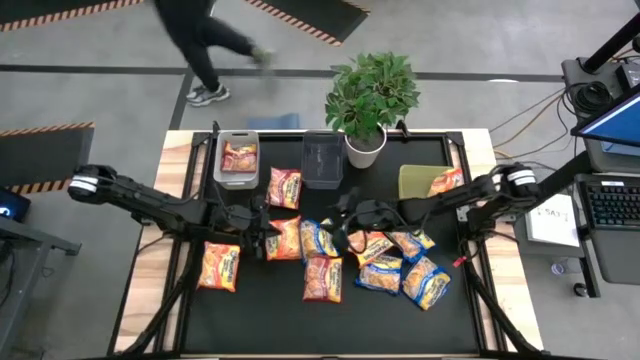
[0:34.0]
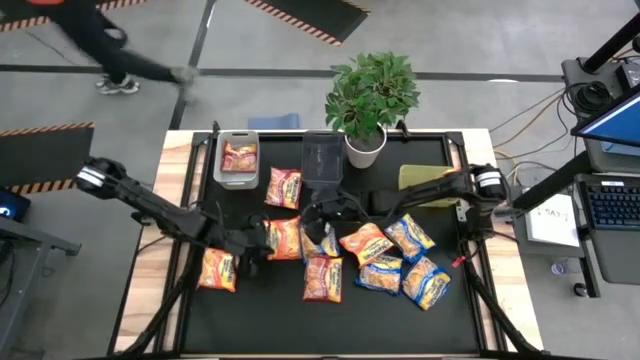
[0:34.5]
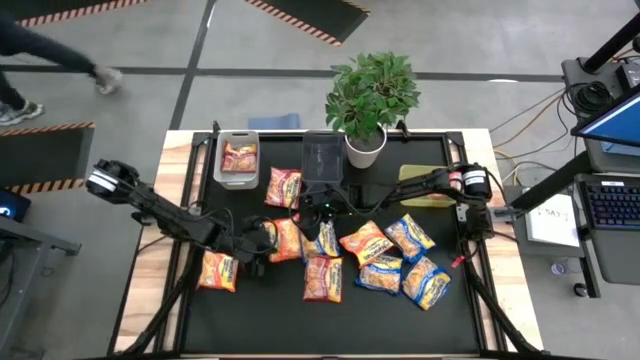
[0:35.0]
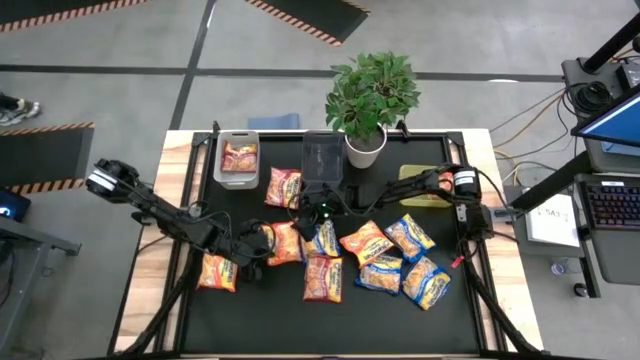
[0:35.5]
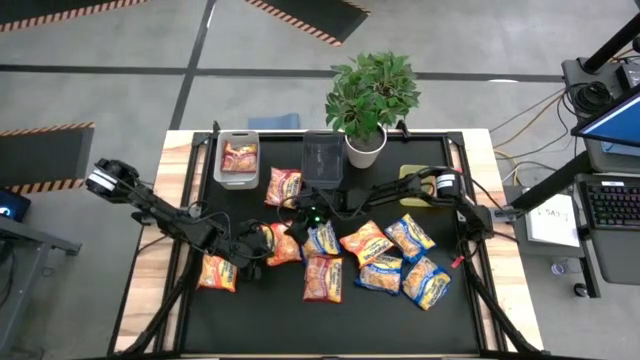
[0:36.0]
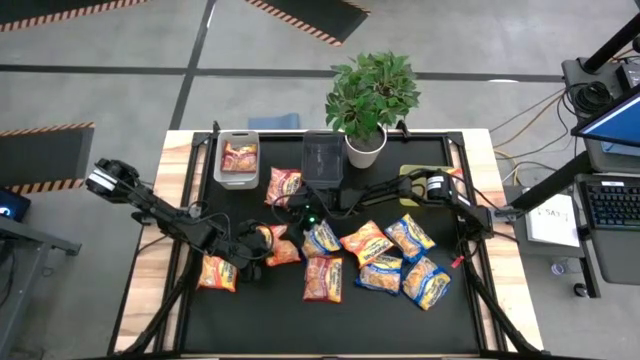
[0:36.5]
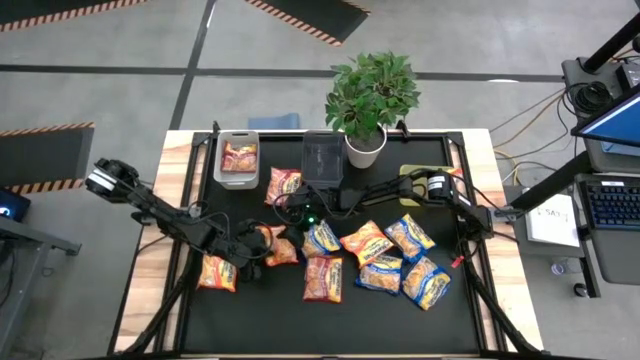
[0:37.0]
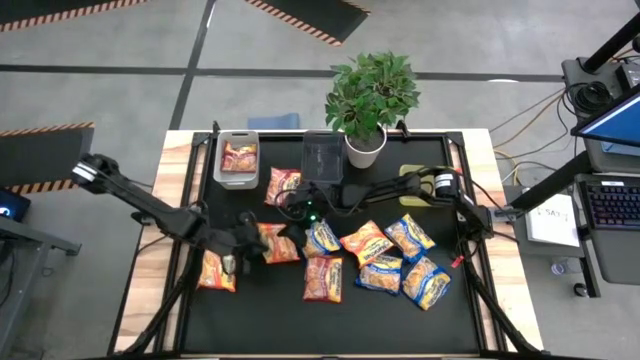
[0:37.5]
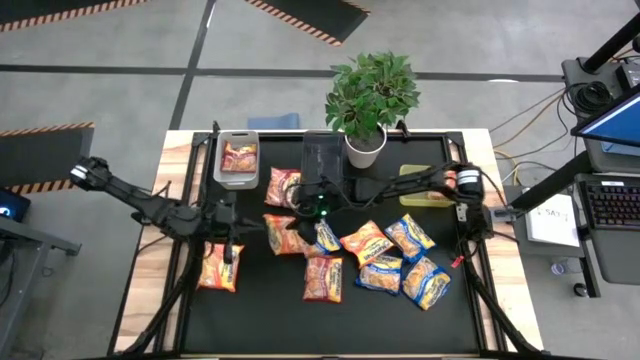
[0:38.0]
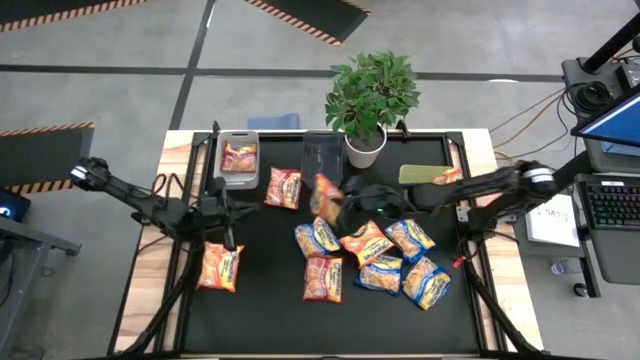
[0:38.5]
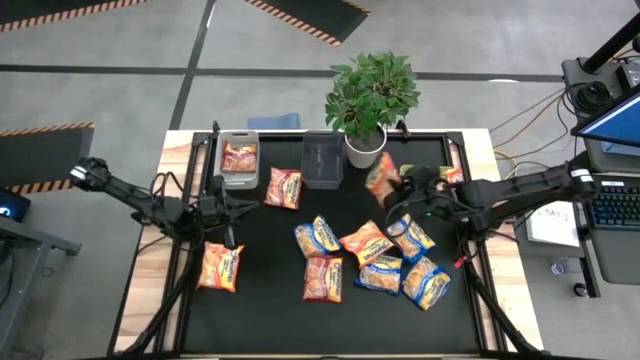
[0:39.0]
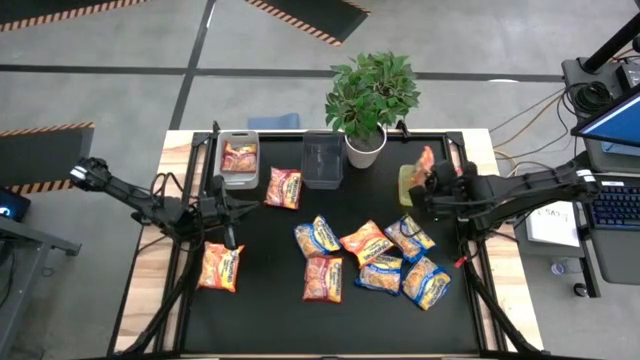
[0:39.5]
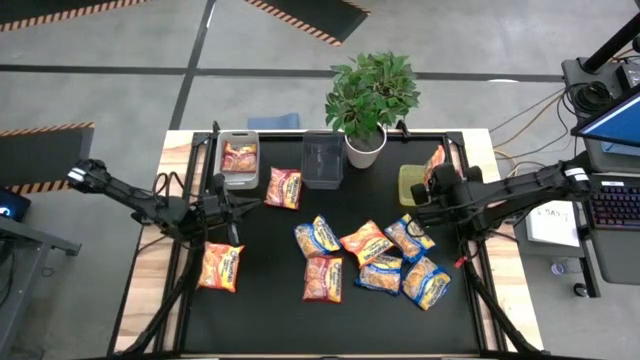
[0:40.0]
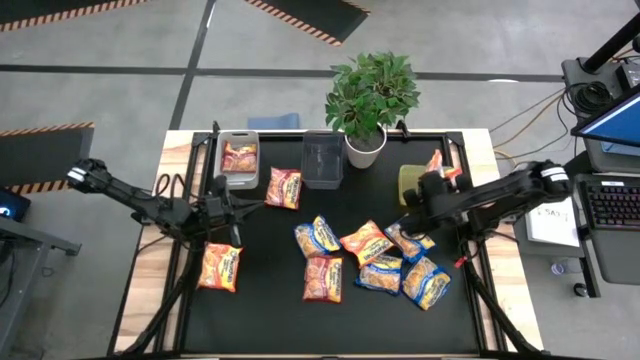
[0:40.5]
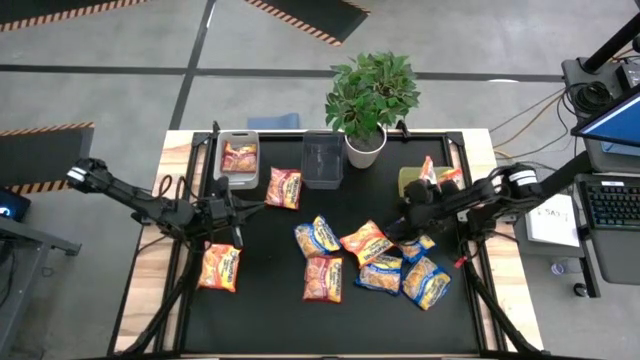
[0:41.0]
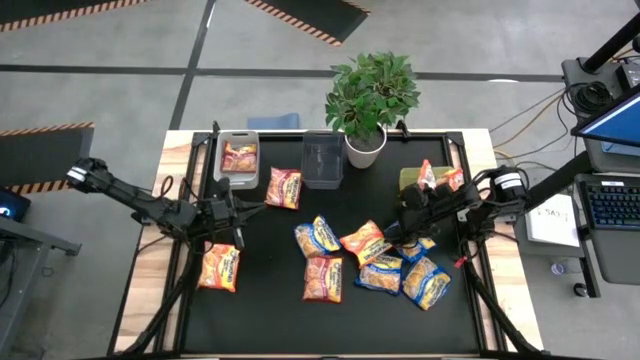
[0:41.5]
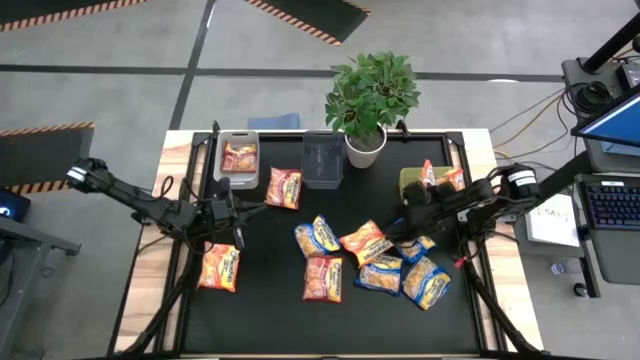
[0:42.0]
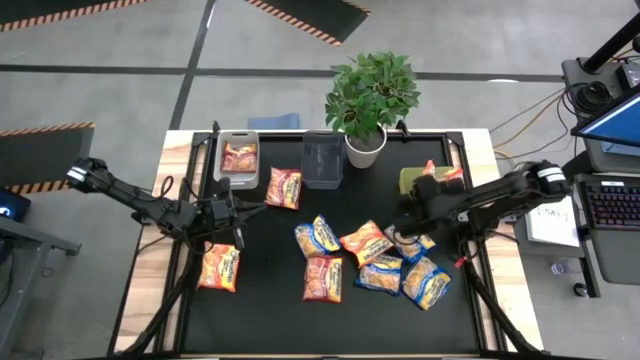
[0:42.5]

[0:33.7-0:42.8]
Task: Sort Maruchan noodles
Put the orange noodle pack into the yellow bin

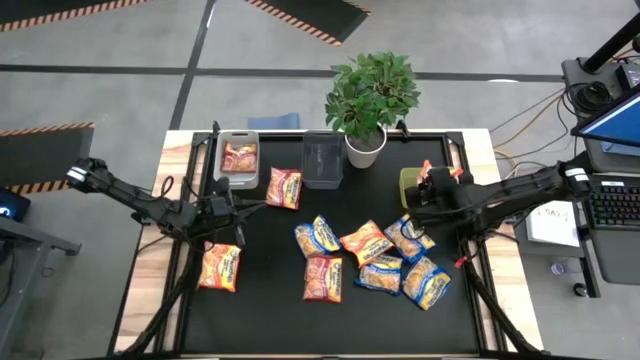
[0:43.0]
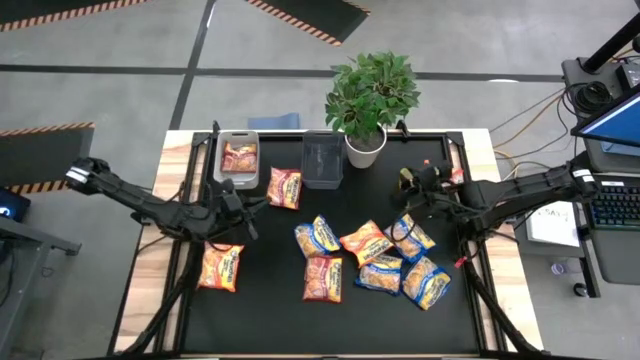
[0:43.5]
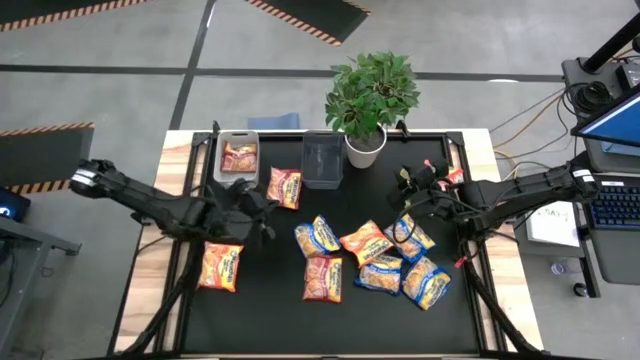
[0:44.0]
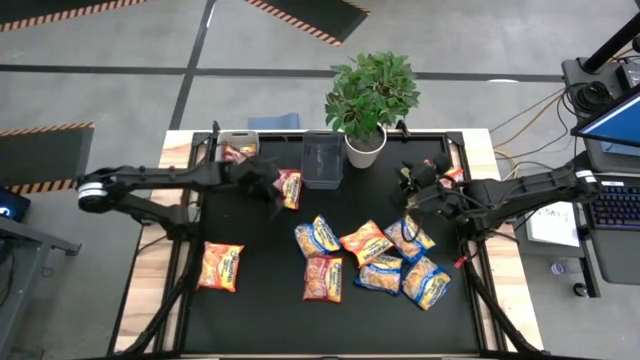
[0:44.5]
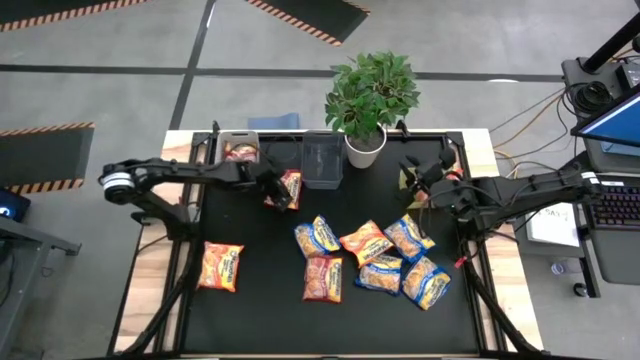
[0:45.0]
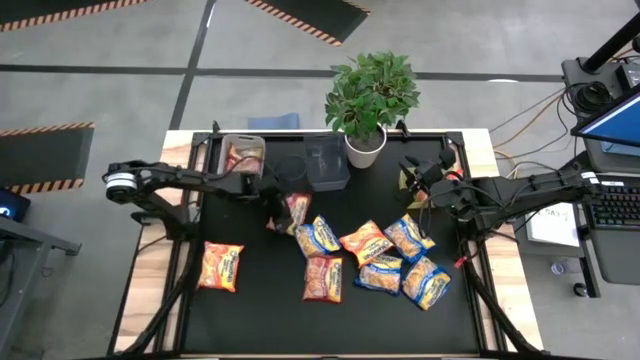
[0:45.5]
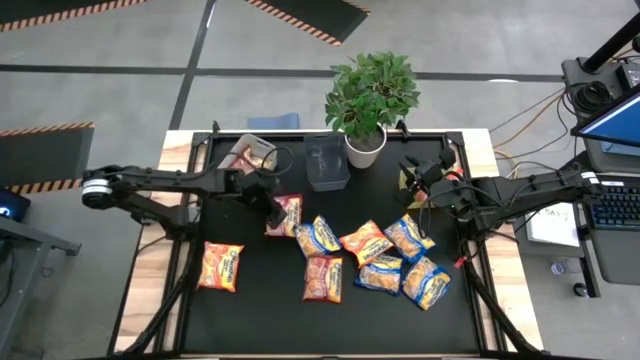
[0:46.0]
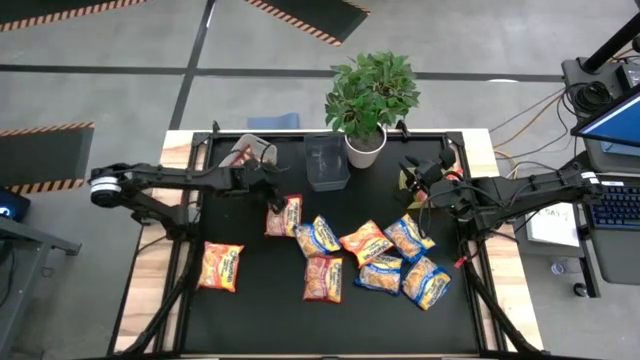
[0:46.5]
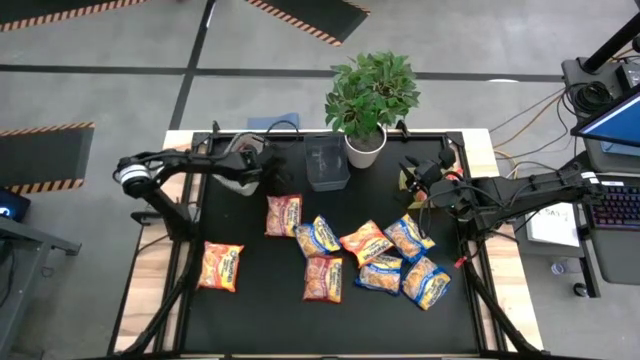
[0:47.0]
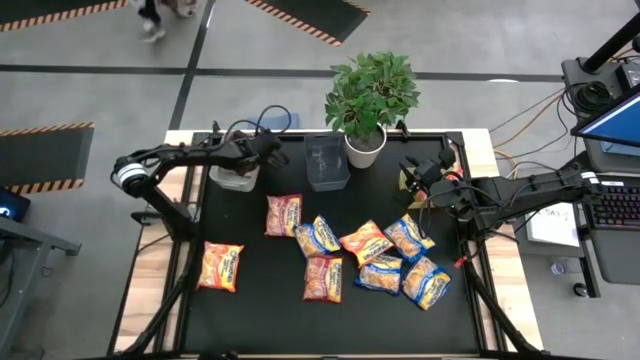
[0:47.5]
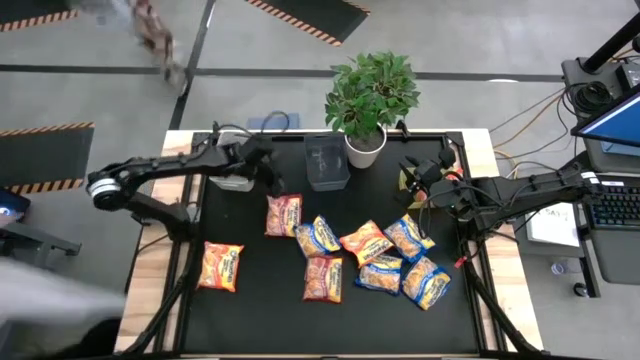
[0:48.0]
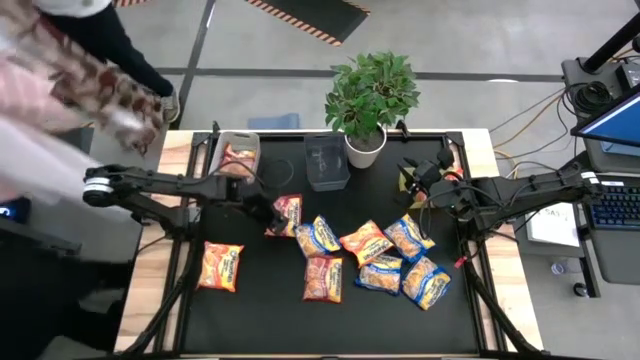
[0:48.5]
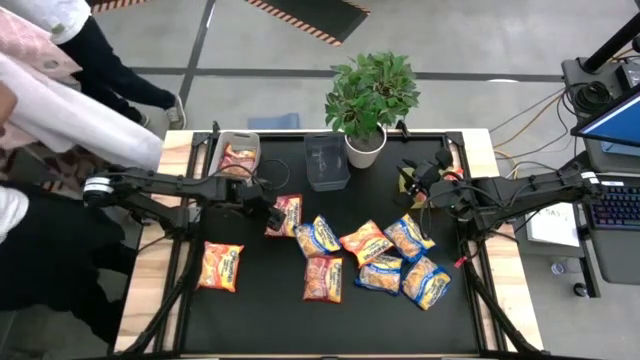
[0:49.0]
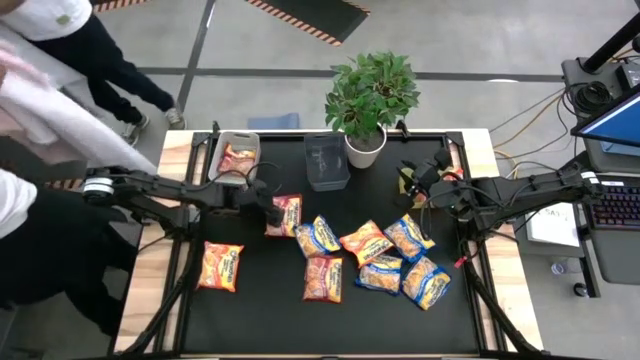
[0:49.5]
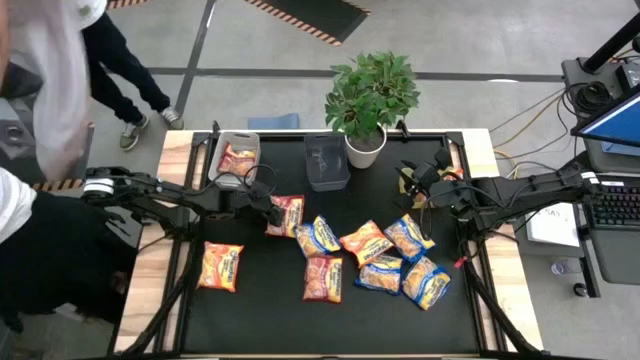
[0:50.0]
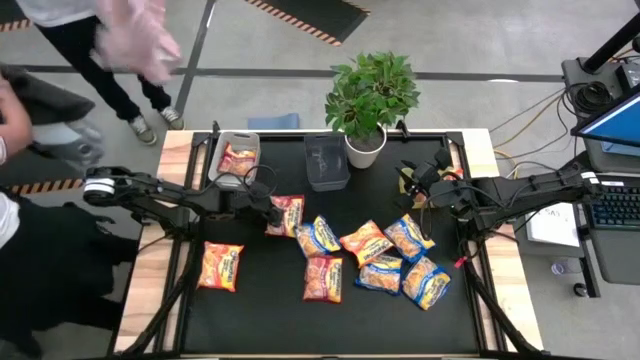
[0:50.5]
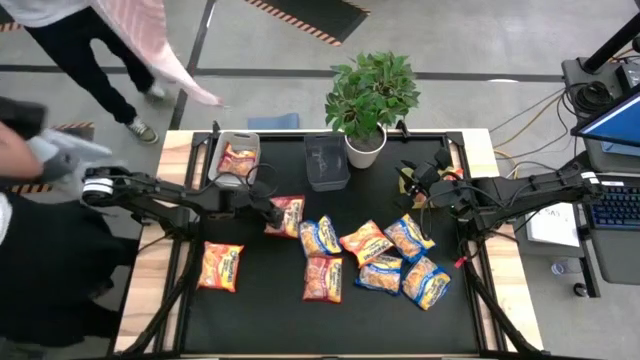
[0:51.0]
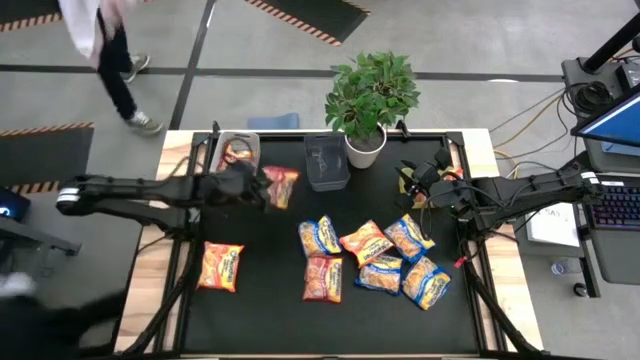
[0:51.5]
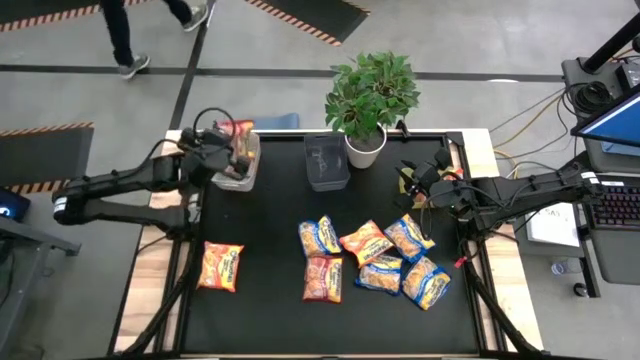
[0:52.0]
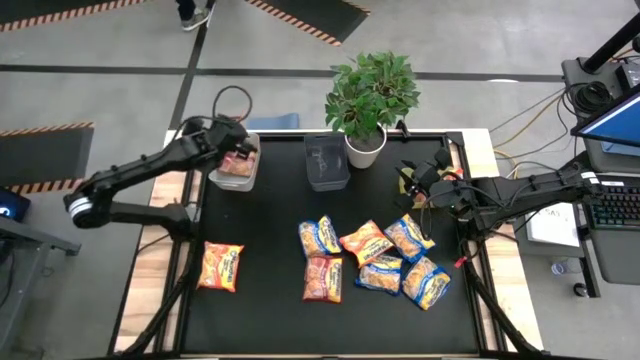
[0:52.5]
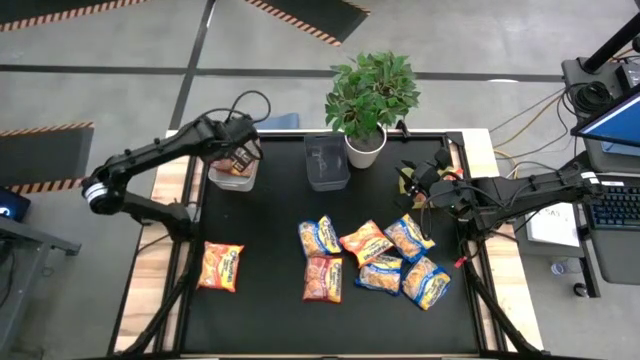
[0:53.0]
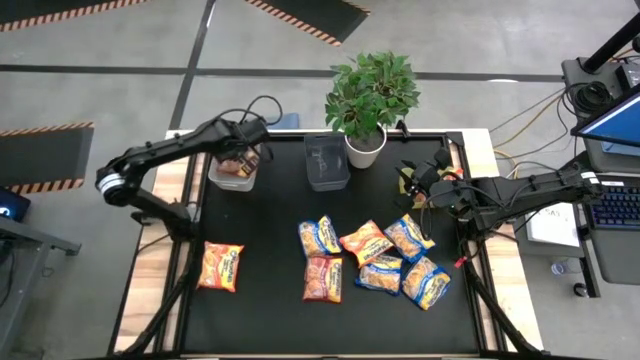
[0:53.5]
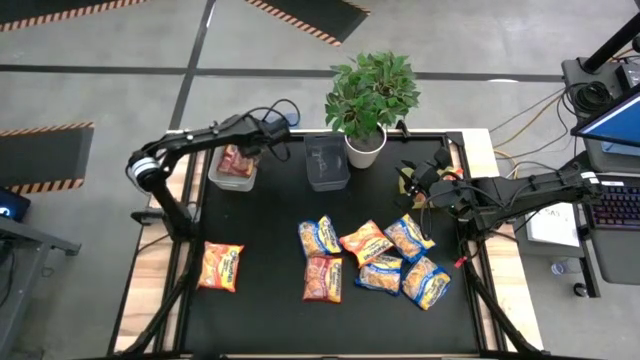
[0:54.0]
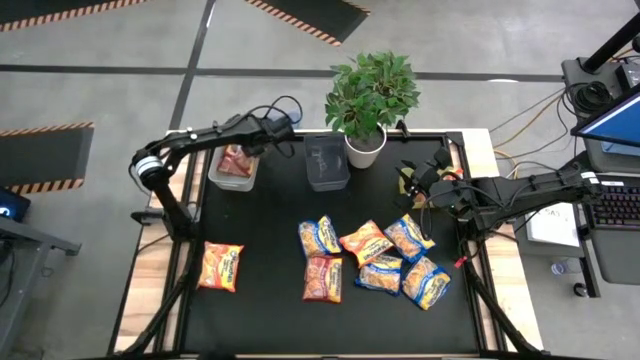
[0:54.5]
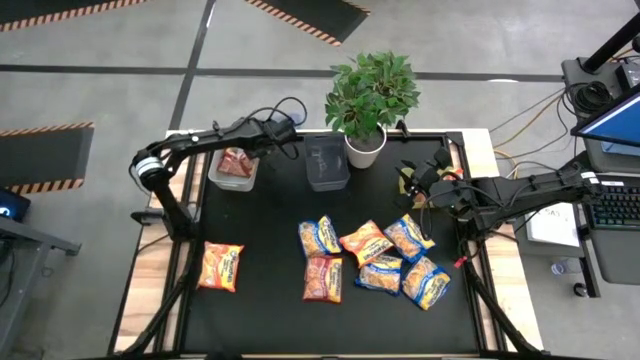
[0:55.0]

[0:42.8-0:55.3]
Put the red noodle pack into the white bin
